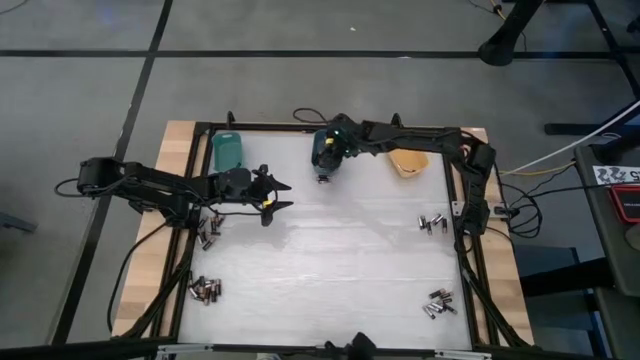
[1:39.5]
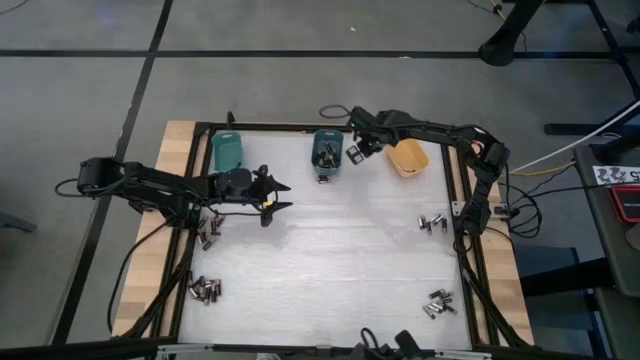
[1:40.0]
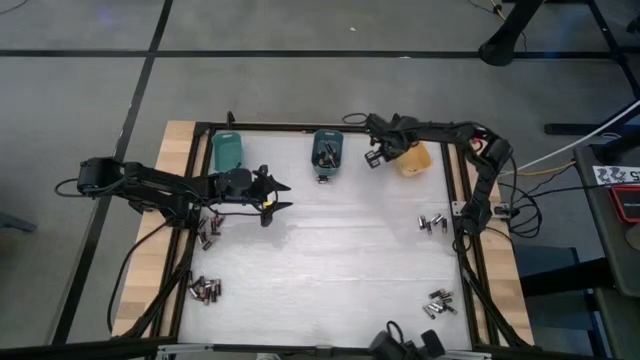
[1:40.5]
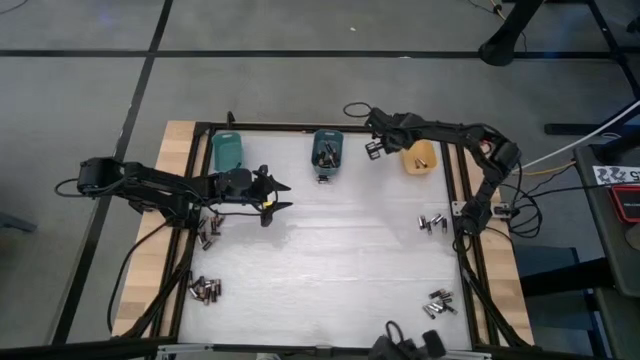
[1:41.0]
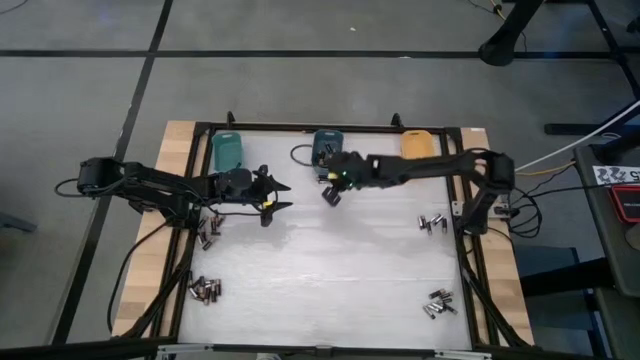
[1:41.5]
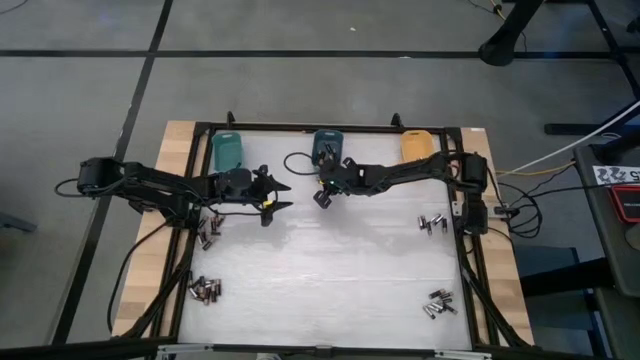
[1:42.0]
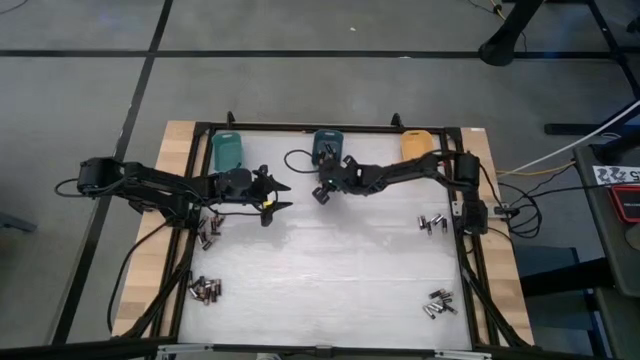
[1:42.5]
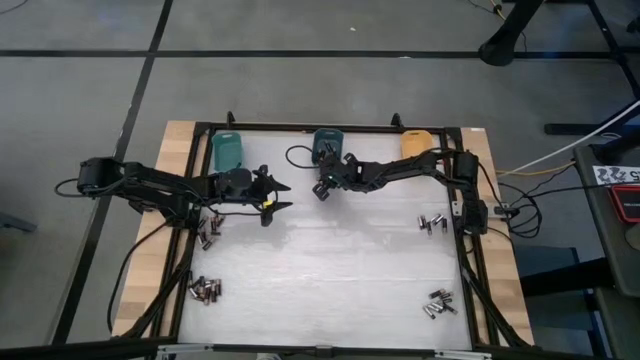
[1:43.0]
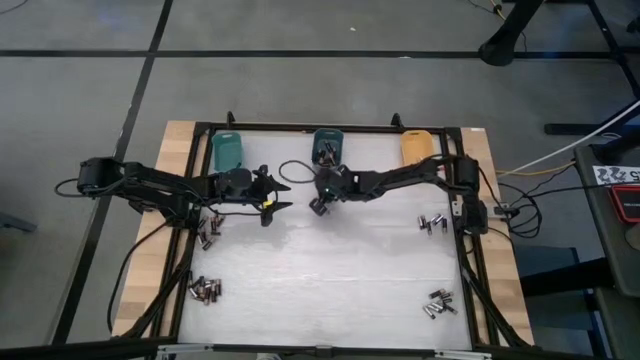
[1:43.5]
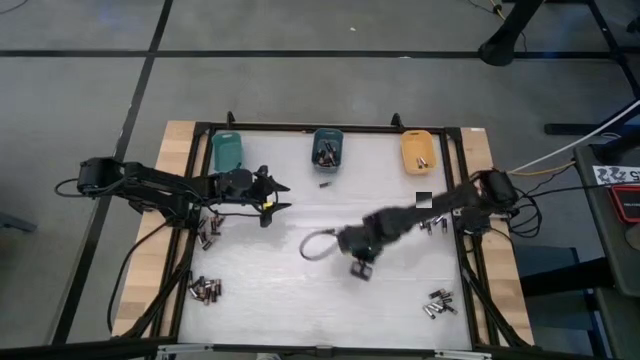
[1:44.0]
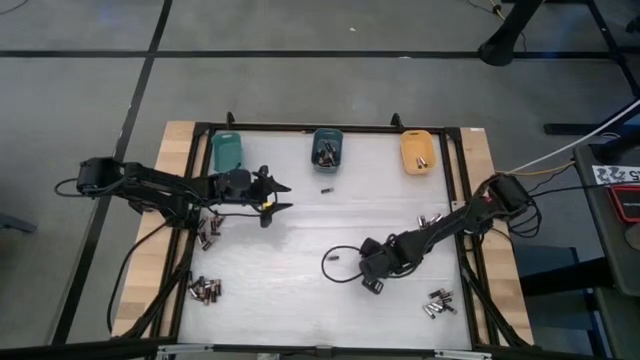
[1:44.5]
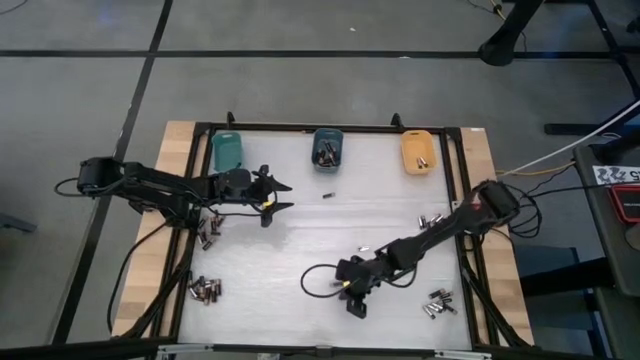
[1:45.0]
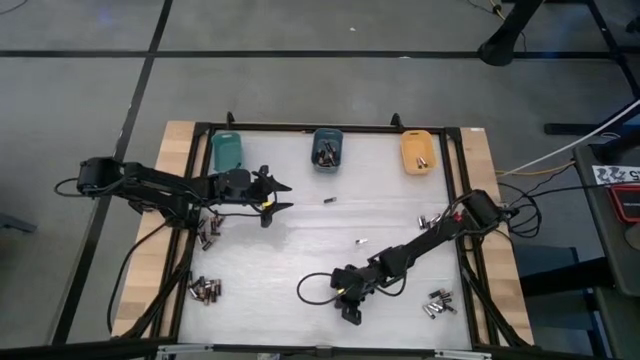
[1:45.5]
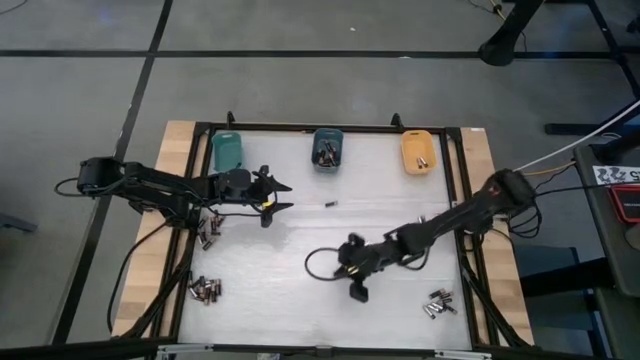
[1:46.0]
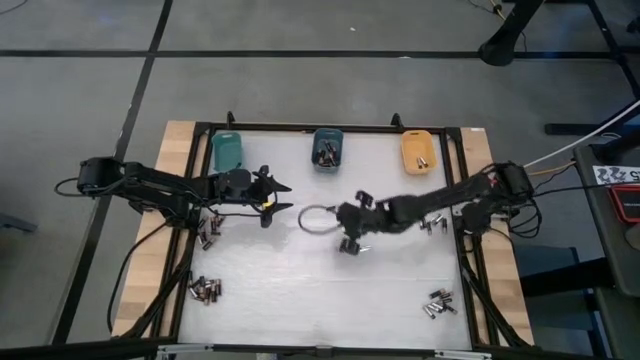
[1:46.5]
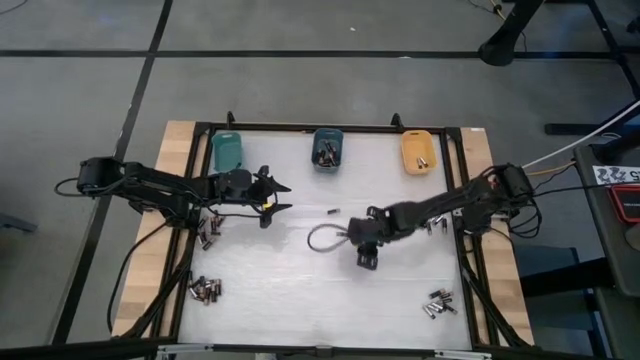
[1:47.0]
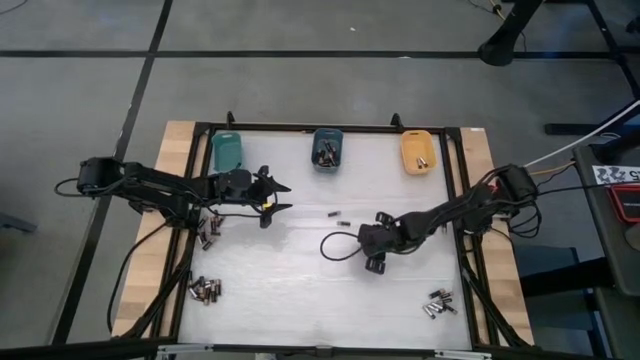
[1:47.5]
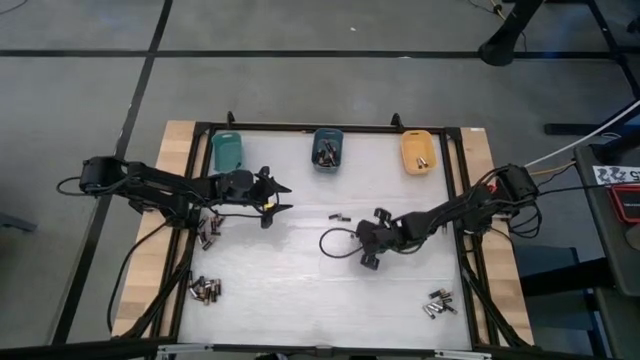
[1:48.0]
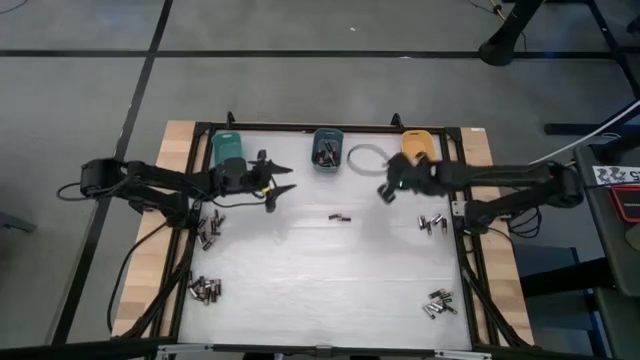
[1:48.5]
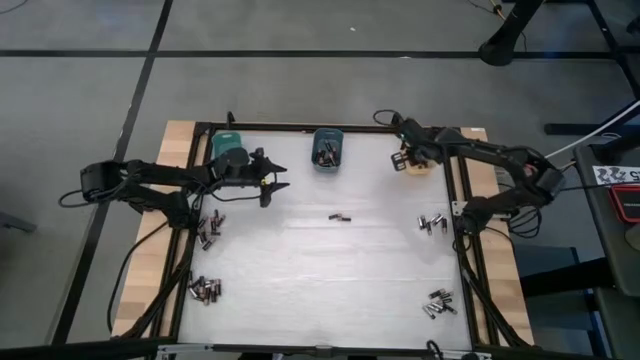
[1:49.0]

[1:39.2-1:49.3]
Task: Sort batteries
Put the silver battery into the yellow bin

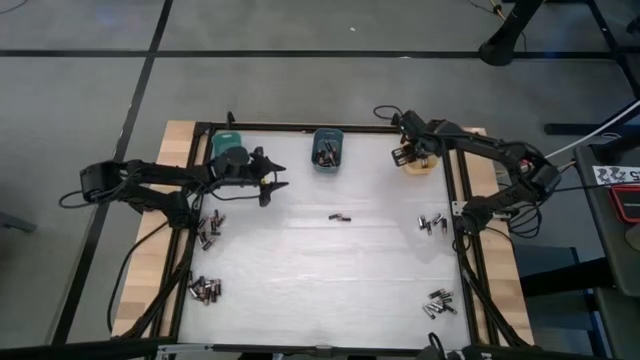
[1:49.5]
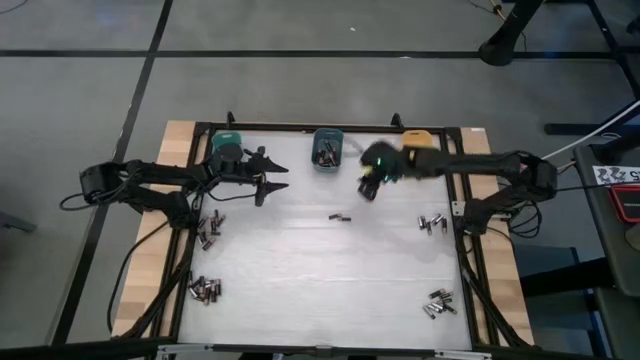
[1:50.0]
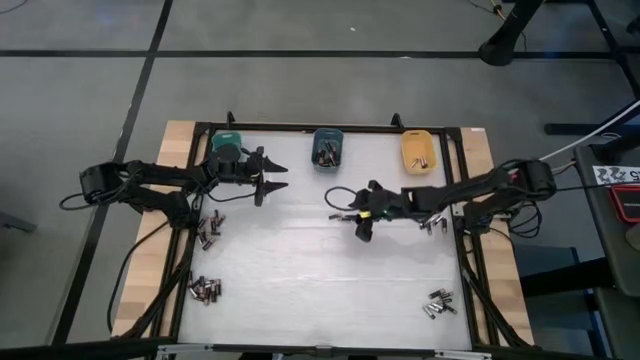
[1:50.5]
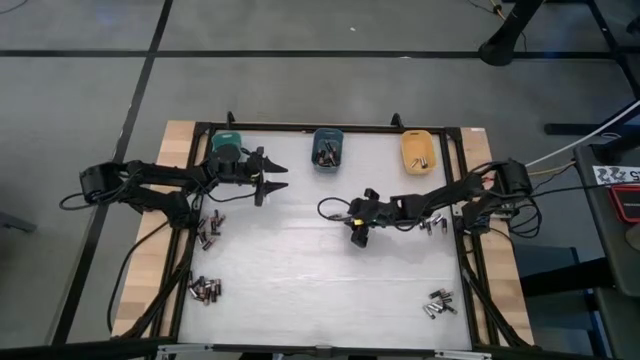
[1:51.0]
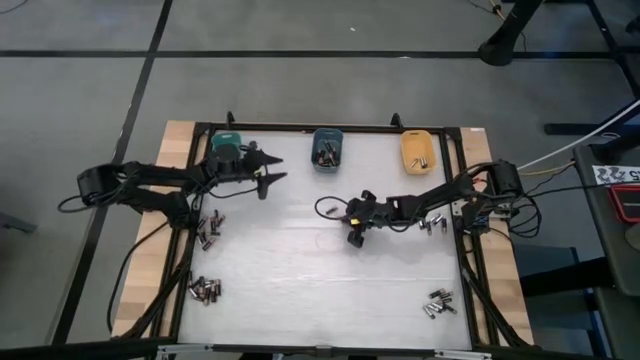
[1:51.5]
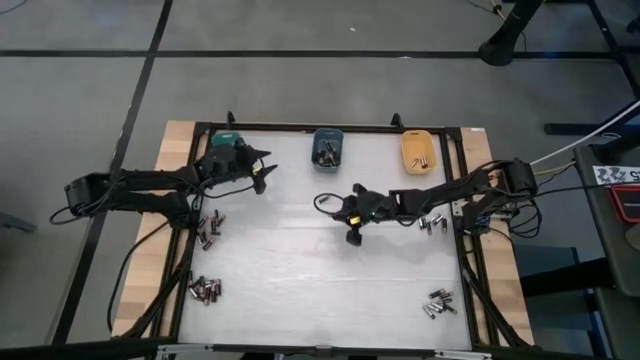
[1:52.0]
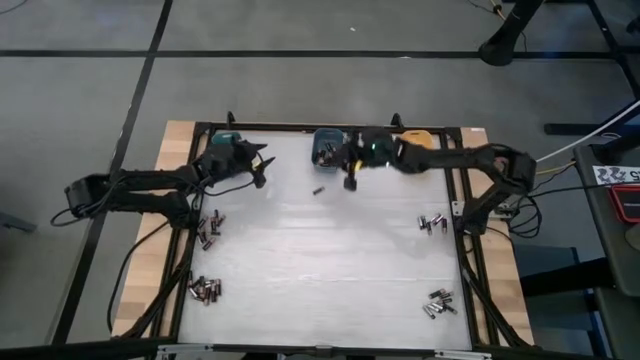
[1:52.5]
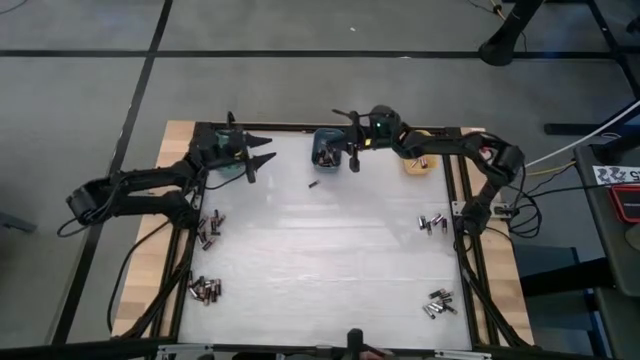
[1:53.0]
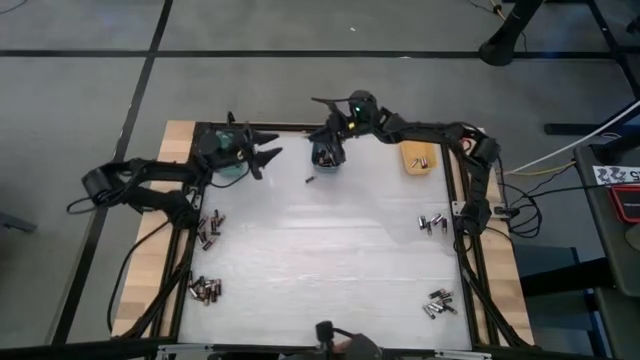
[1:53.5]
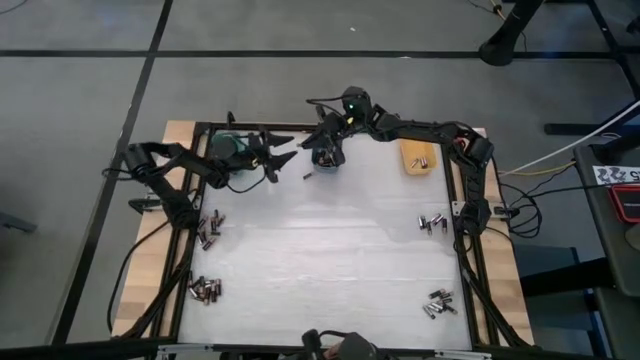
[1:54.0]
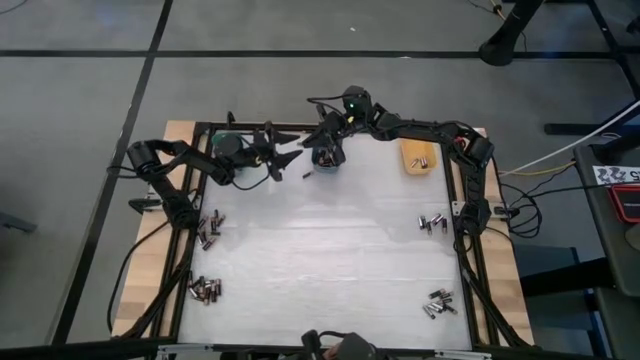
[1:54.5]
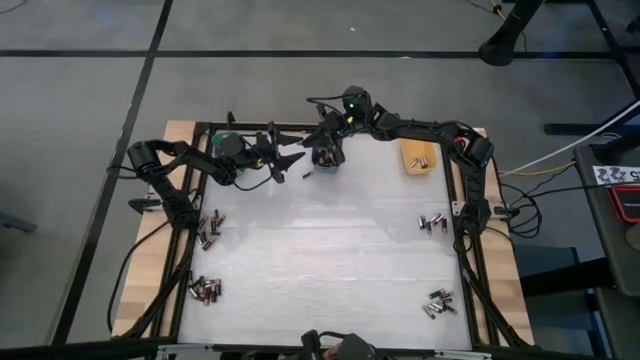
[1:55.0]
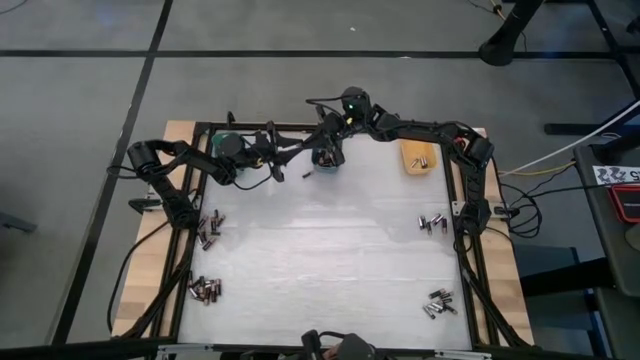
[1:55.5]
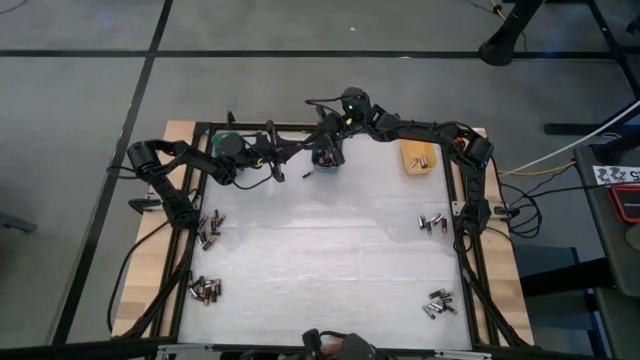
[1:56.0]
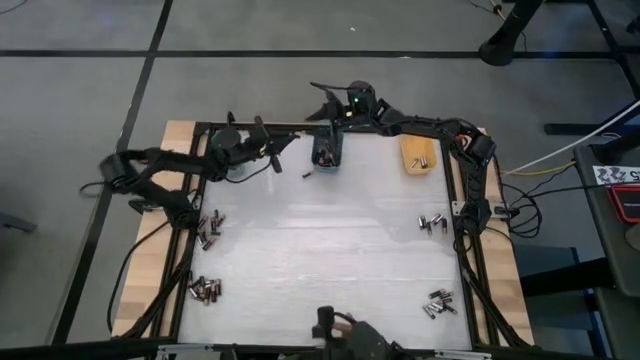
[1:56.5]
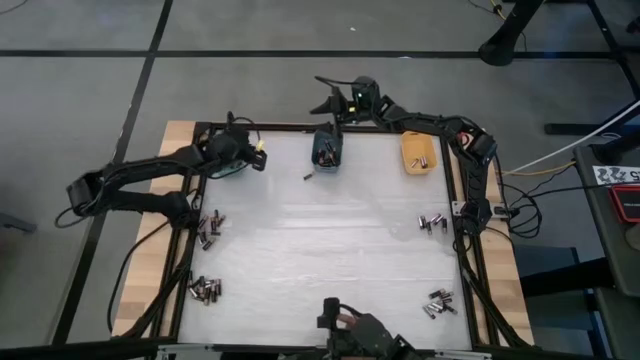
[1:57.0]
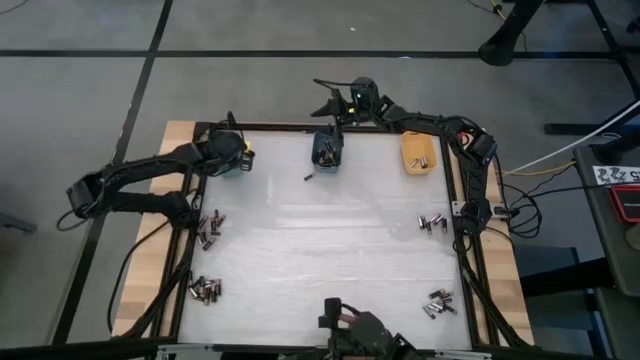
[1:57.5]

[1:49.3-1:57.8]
Put the brown battery into the green bin

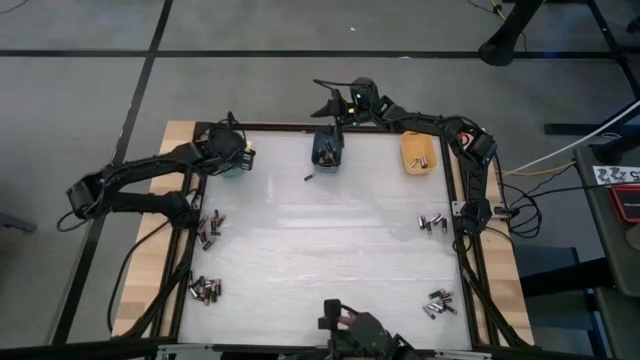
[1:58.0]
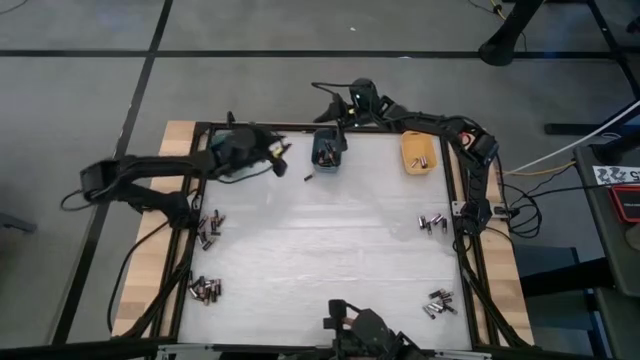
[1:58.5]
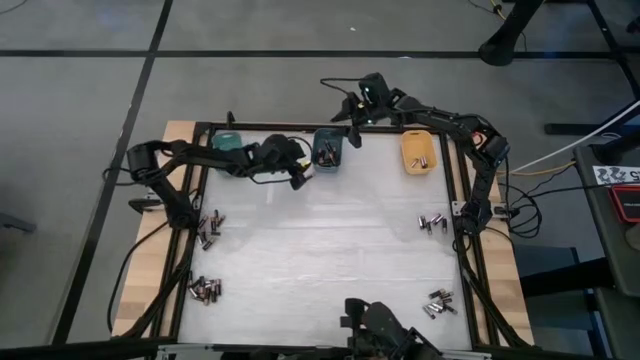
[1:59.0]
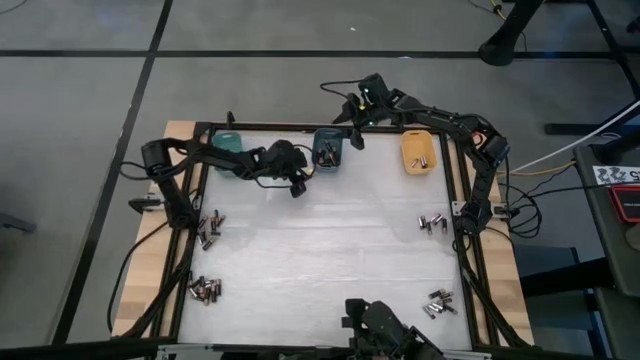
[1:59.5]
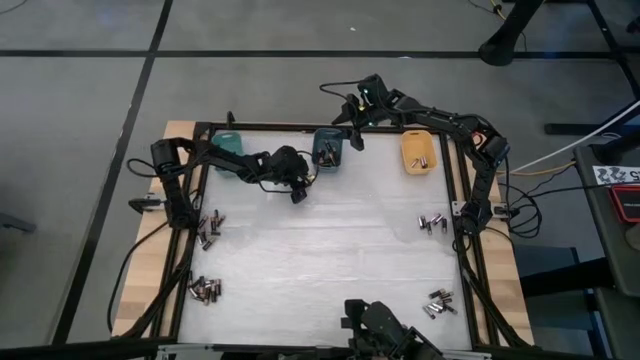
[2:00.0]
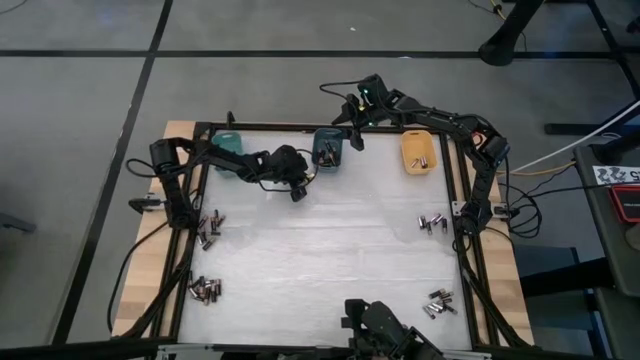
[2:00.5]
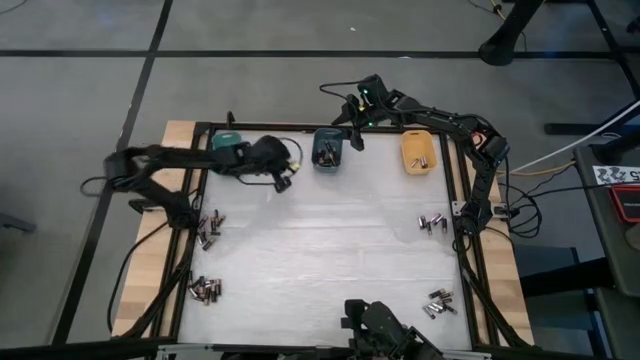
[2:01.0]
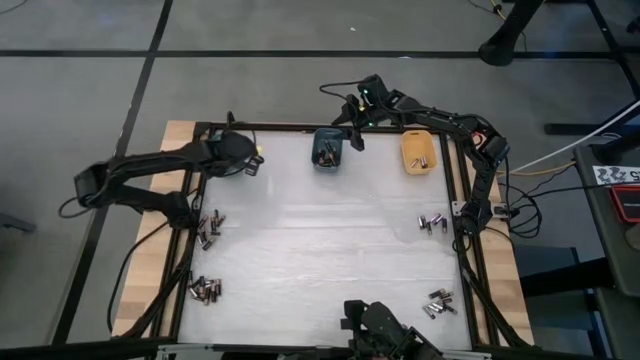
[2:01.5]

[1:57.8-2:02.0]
Put the brown battery into the green bin
